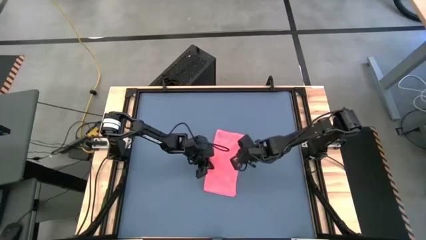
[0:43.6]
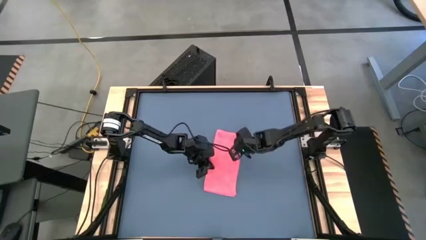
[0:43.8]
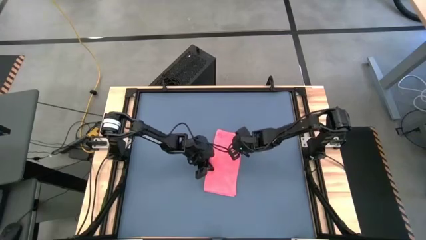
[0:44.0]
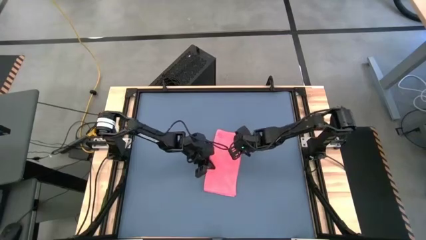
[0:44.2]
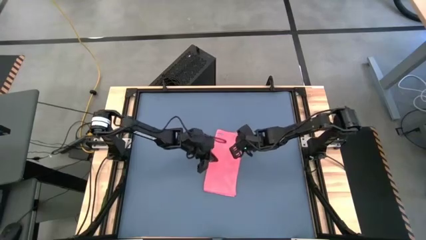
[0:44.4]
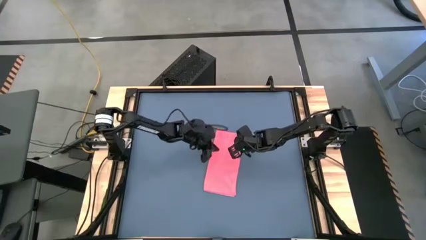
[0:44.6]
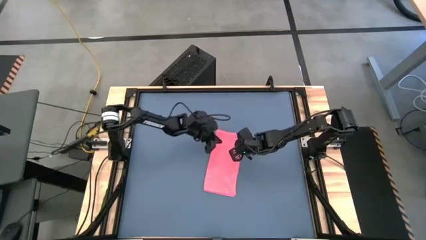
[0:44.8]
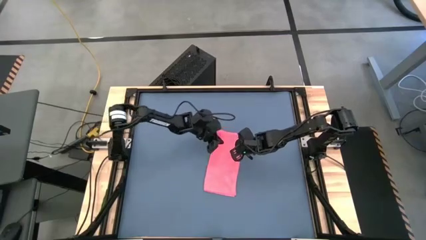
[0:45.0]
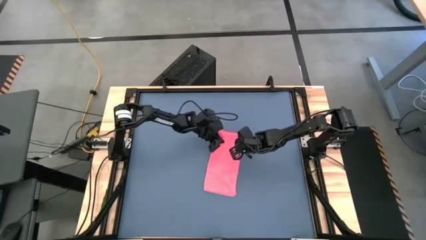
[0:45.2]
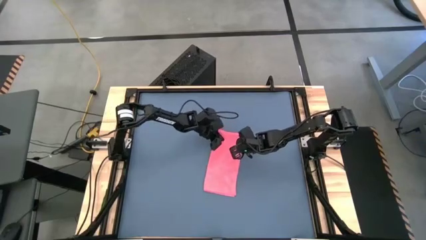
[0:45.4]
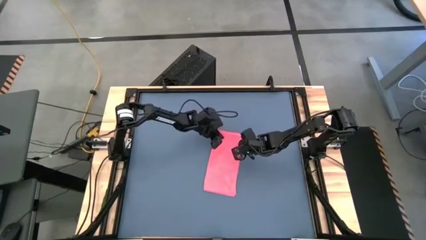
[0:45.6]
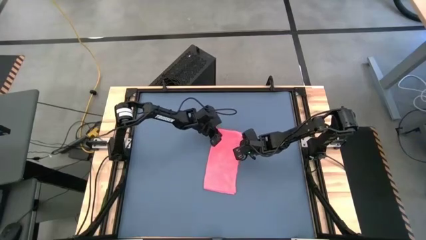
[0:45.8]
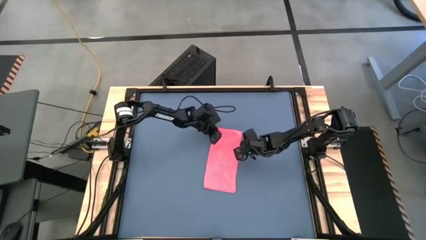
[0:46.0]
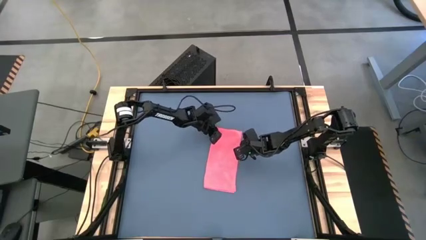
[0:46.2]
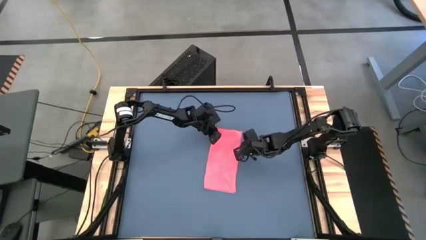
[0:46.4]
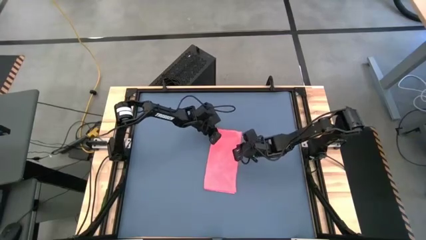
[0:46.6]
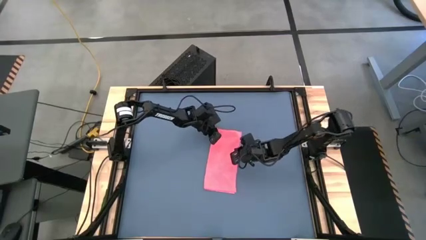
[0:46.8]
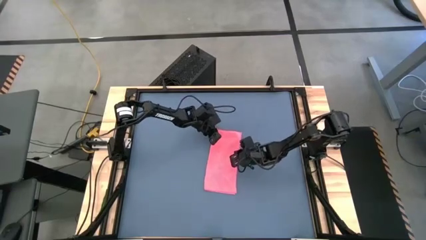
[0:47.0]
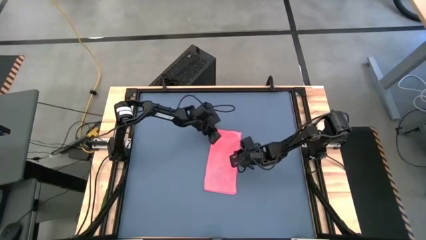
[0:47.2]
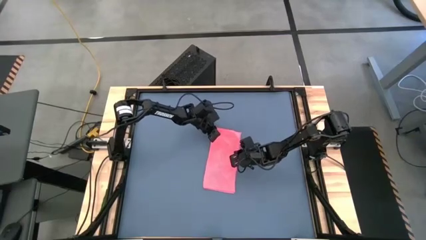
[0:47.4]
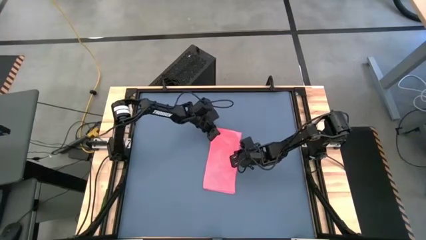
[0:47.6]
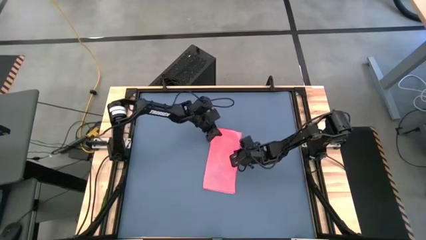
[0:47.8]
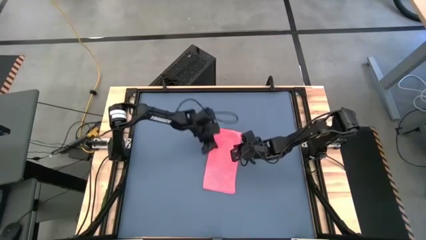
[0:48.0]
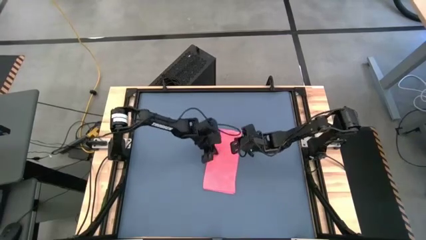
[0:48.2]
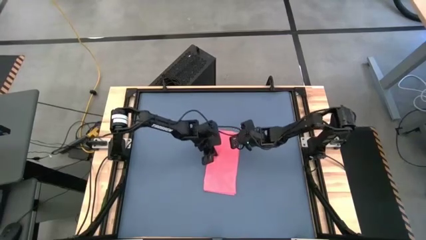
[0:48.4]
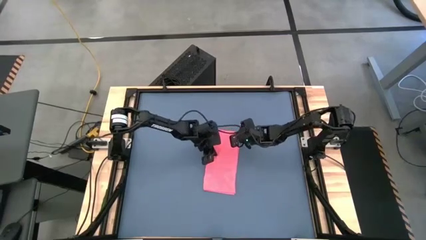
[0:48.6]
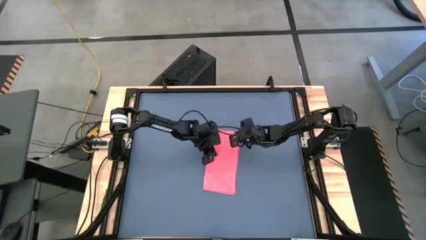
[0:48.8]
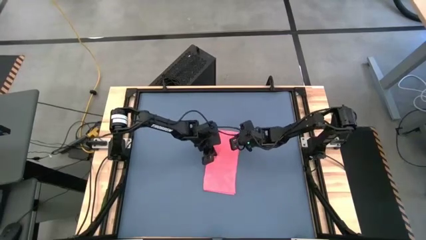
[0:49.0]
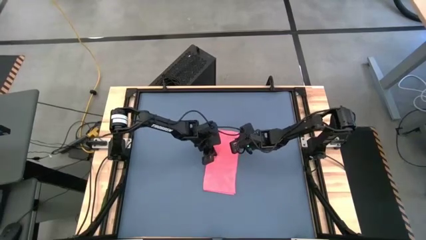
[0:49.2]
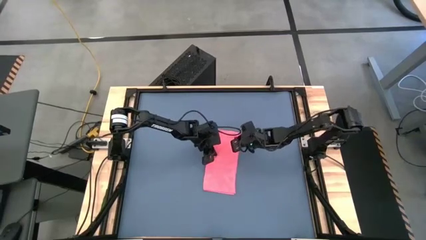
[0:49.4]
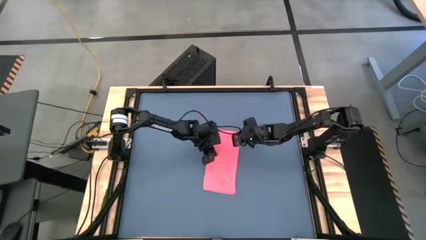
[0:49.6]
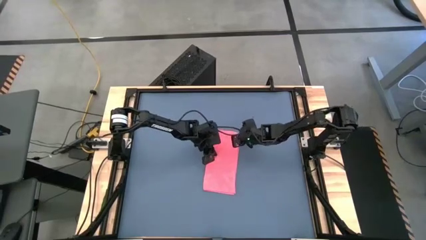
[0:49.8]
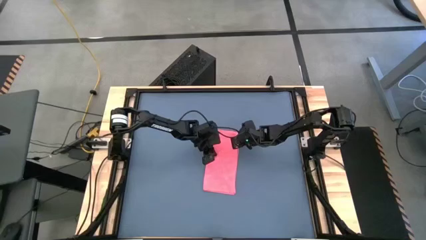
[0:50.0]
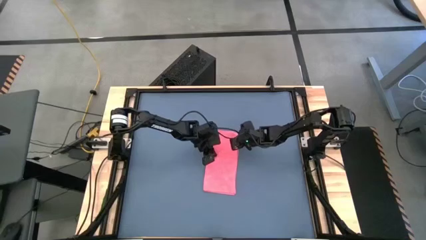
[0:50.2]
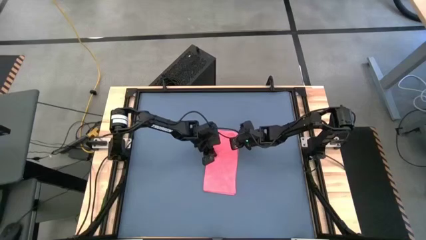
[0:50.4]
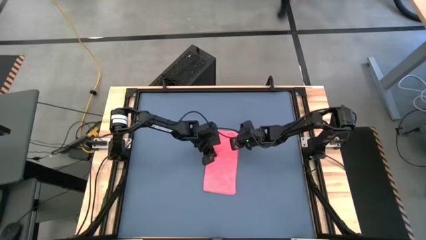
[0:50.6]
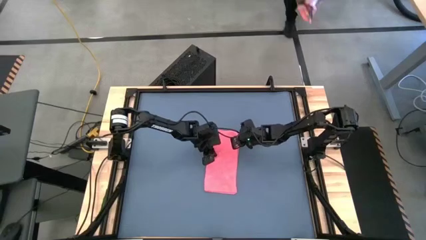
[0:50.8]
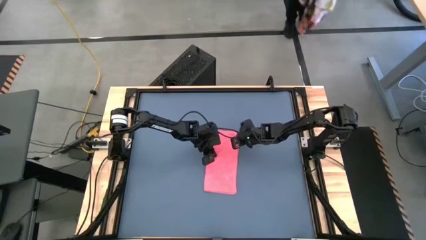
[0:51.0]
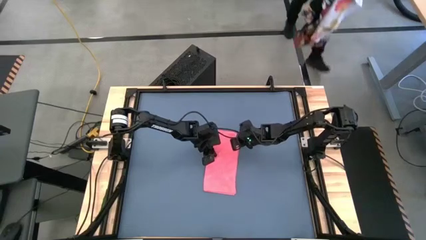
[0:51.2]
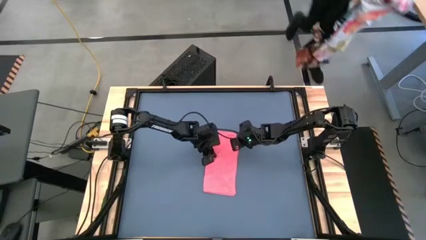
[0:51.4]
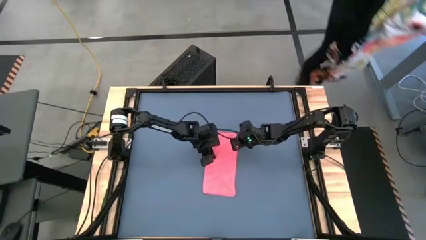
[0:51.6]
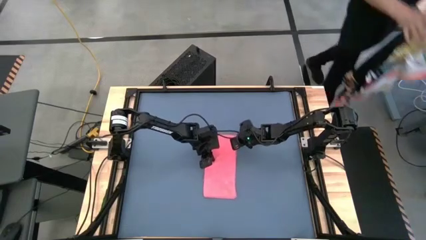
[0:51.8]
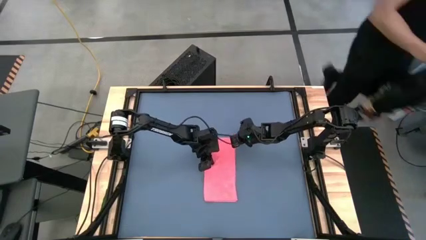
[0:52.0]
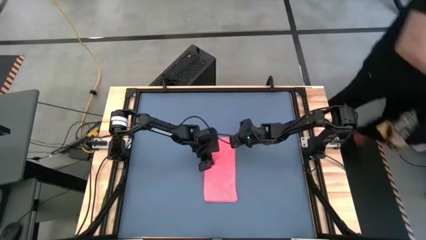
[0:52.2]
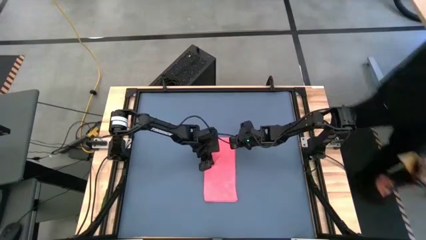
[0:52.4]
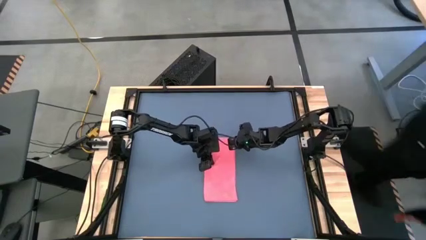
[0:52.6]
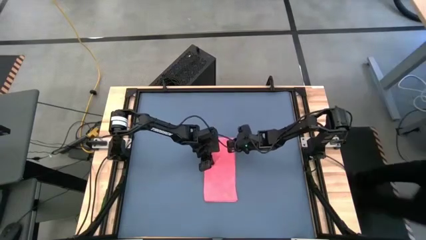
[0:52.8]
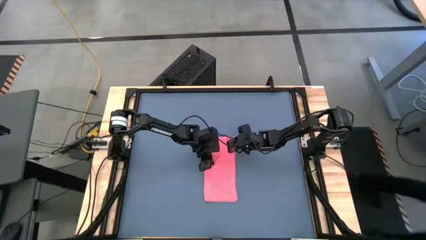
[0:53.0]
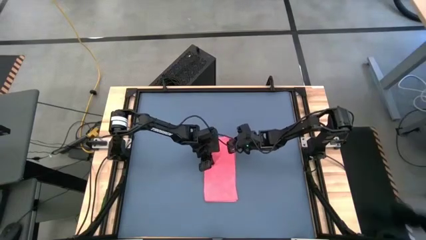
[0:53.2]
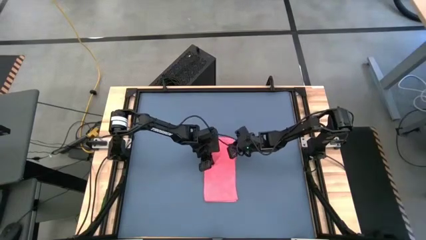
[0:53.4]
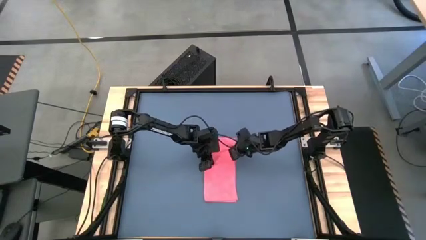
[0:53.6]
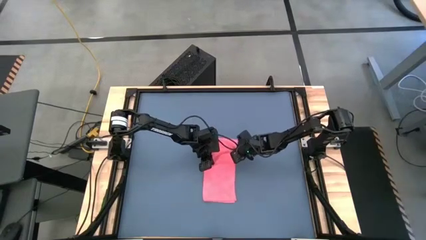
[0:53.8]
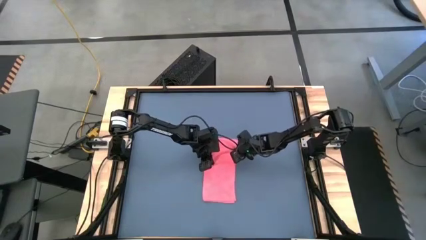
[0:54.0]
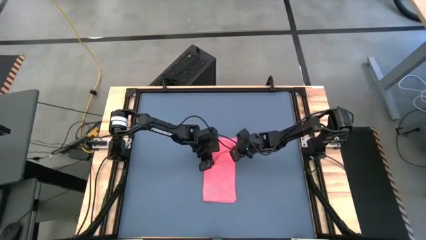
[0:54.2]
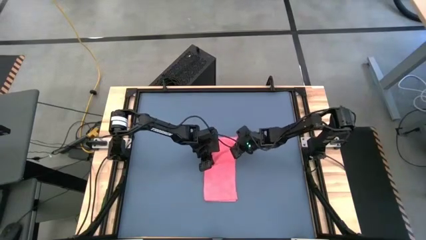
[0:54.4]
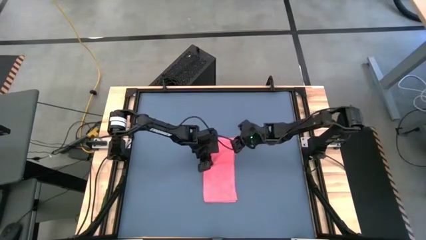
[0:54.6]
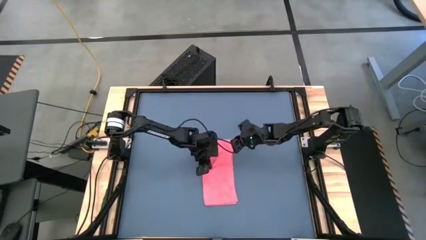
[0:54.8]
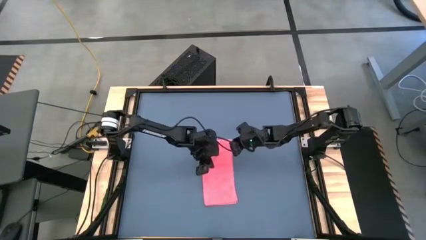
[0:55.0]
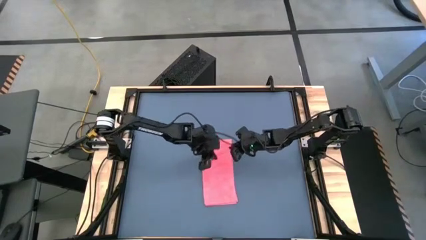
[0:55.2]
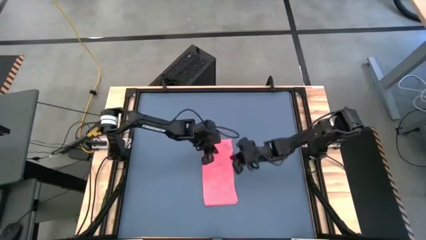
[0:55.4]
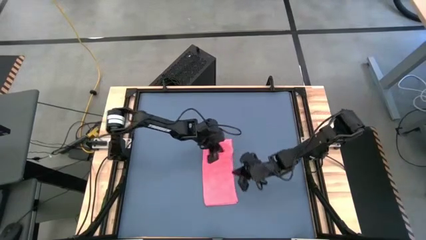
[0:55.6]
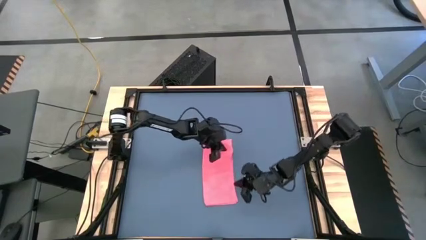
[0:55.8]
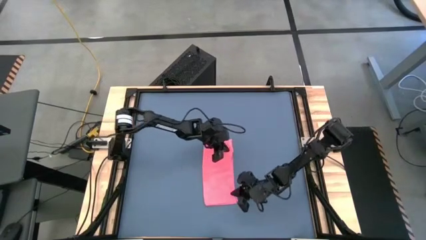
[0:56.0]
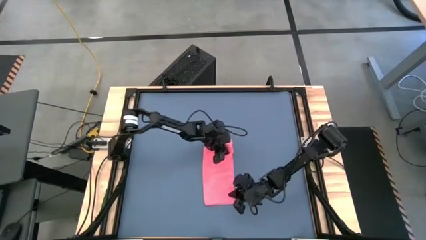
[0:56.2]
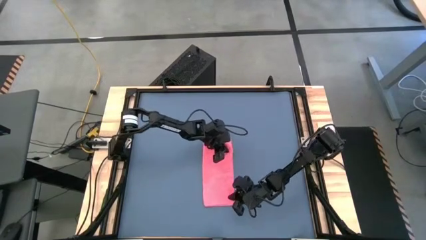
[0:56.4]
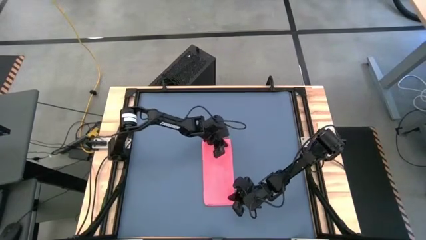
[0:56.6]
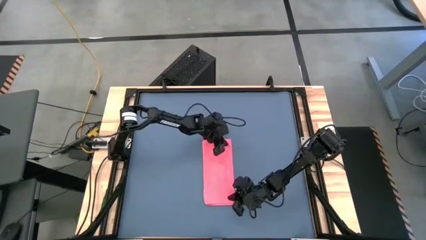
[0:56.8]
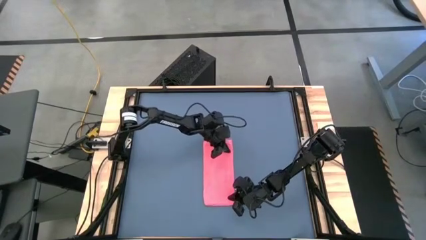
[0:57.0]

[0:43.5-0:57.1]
Task: Roll towel
Fold the pink towel

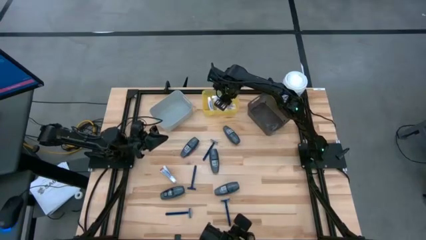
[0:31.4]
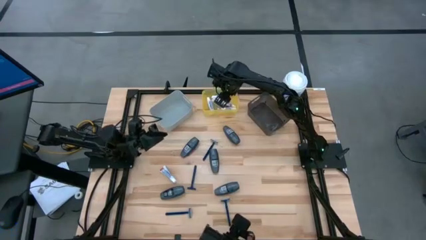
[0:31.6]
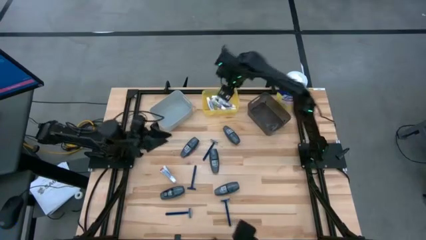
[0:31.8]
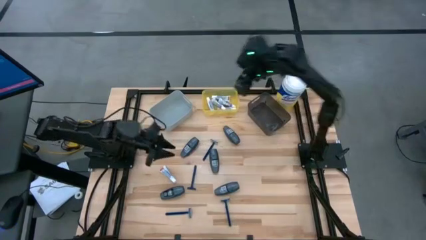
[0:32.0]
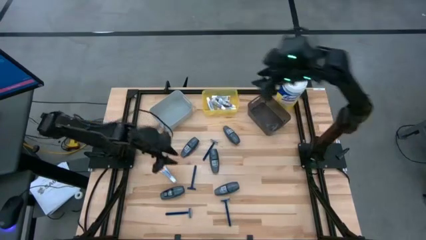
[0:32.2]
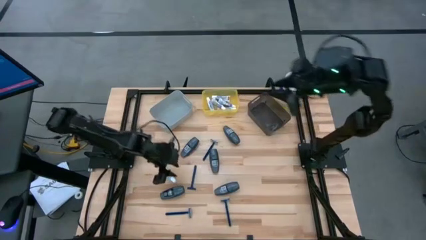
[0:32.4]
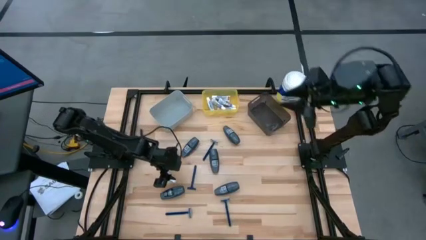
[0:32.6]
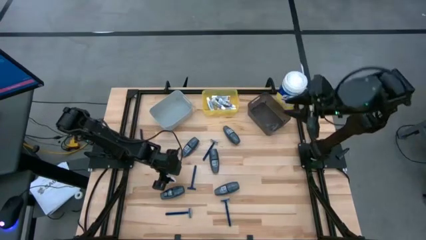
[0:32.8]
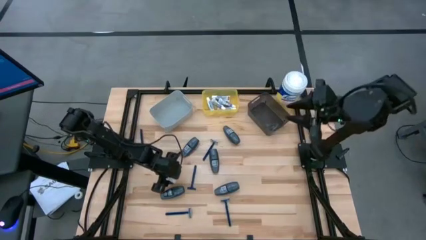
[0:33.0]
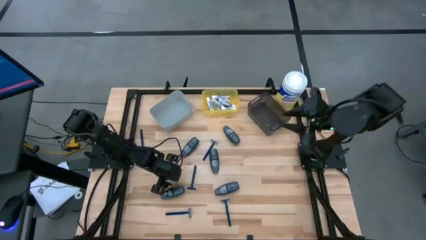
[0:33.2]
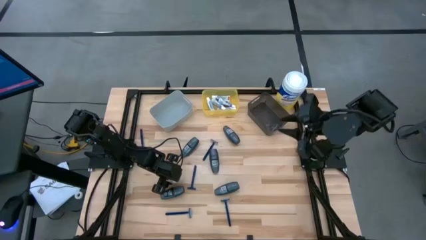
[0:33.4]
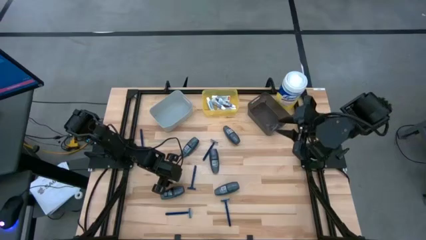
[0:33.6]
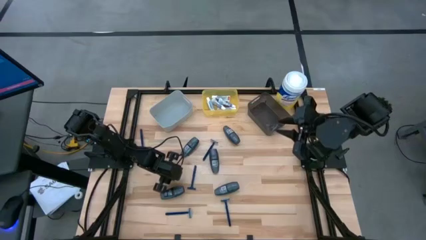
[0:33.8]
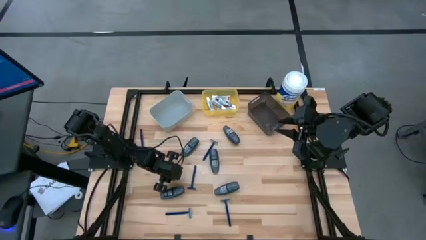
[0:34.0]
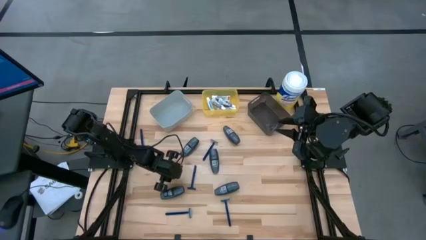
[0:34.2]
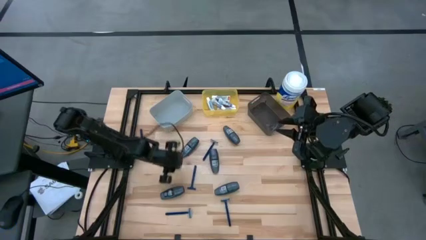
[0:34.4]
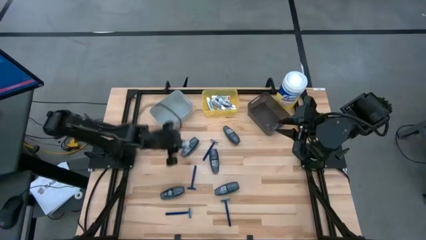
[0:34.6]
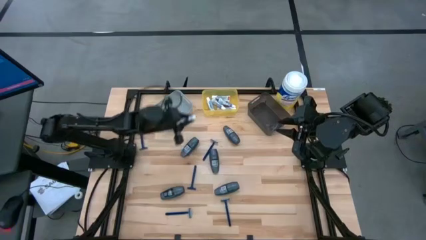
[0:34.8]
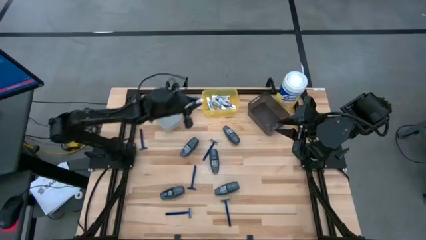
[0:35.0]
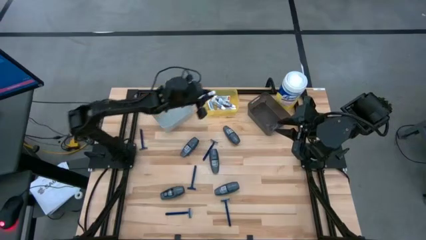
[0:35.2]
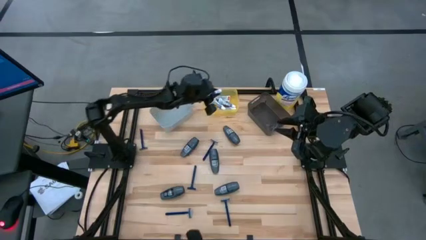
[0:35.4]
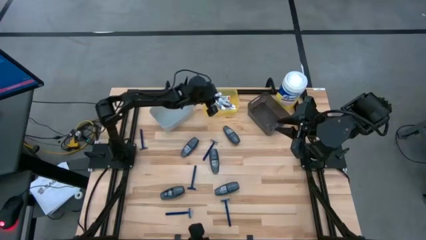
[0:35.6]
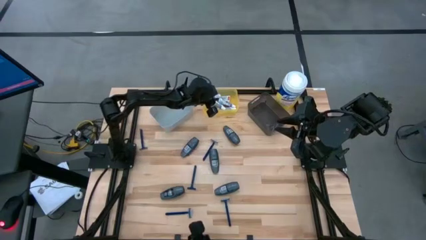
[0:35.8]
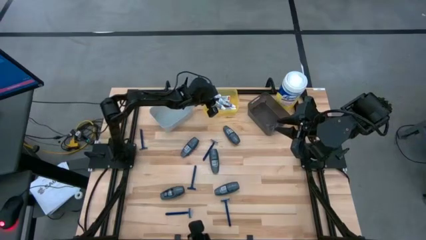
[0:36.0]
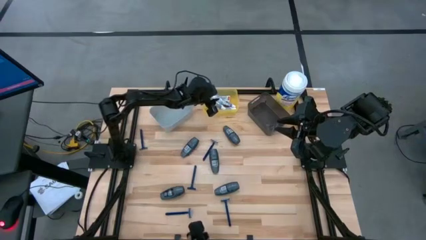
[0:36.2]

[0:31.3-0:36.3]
Task: Pick & Place Travel size toiletries
Put the white toothpaste into the yellow bin
